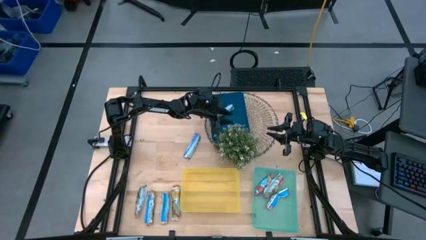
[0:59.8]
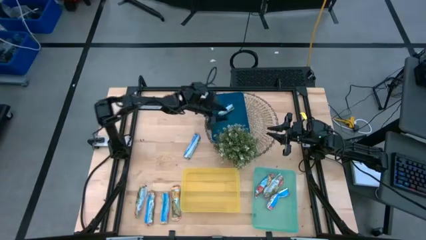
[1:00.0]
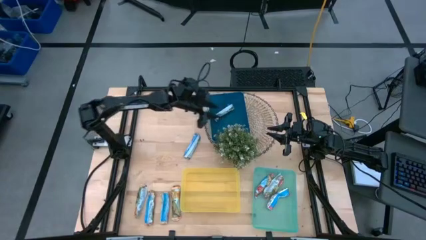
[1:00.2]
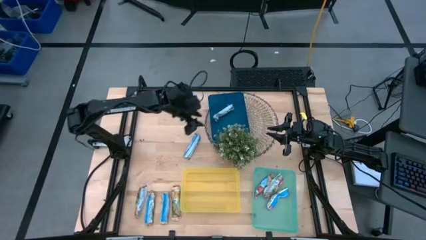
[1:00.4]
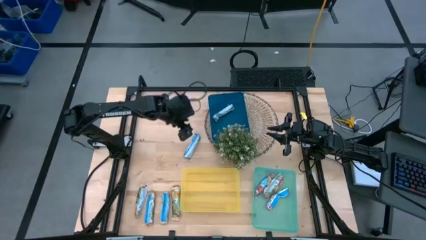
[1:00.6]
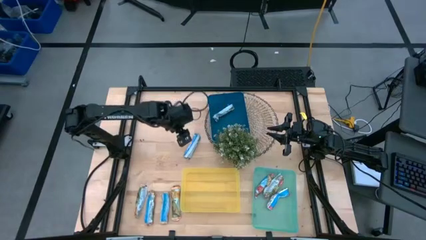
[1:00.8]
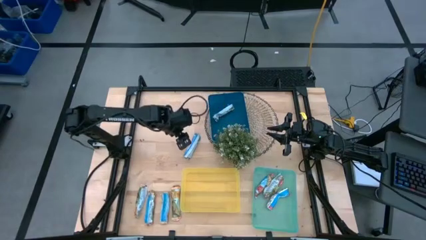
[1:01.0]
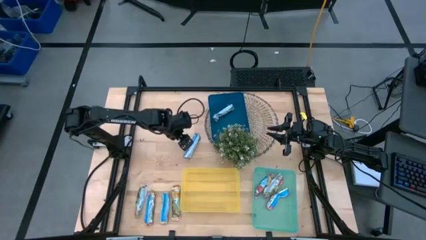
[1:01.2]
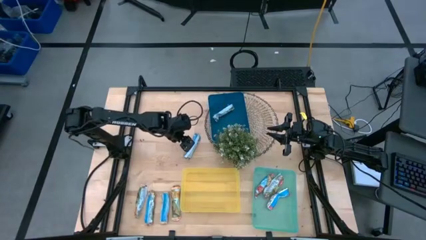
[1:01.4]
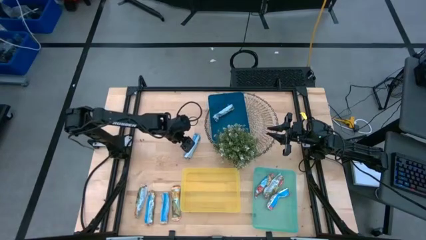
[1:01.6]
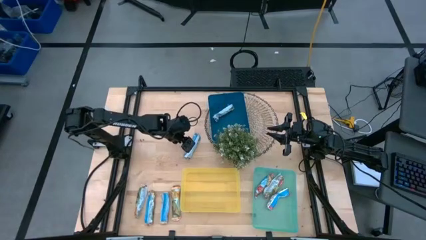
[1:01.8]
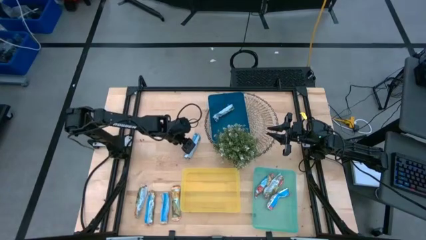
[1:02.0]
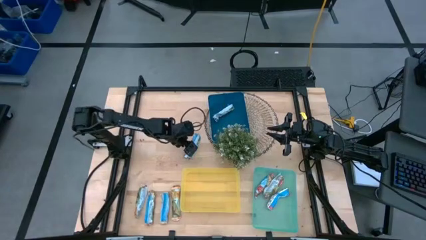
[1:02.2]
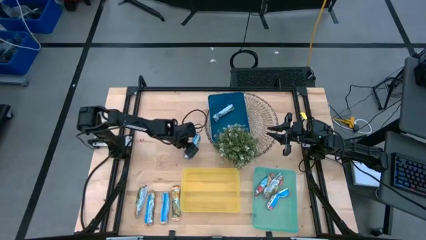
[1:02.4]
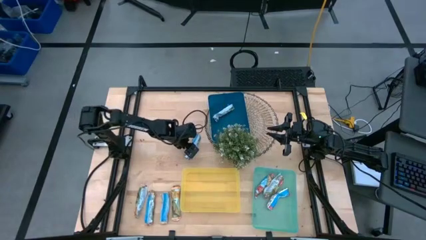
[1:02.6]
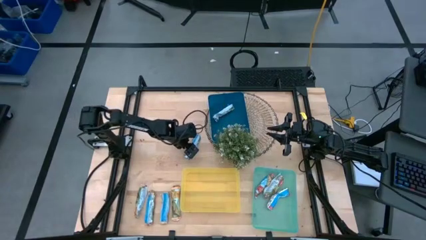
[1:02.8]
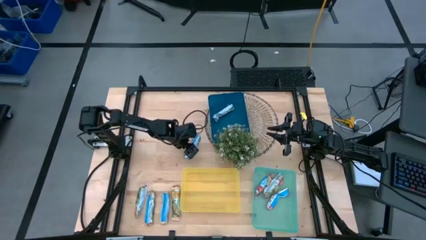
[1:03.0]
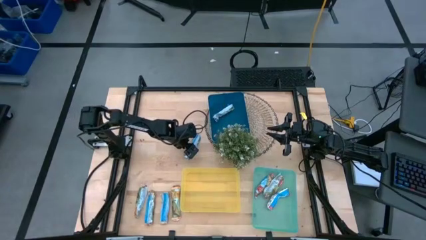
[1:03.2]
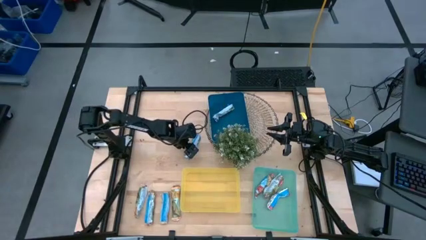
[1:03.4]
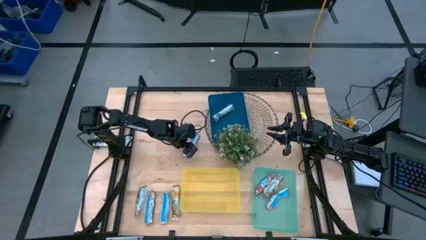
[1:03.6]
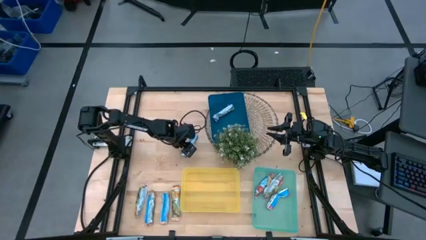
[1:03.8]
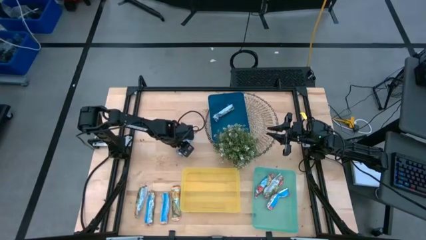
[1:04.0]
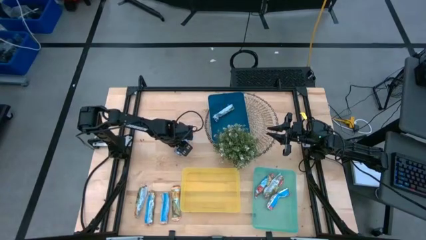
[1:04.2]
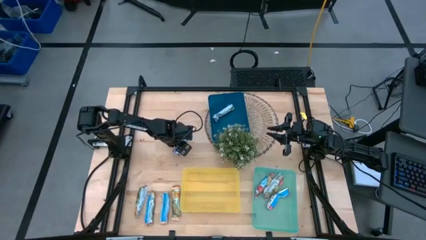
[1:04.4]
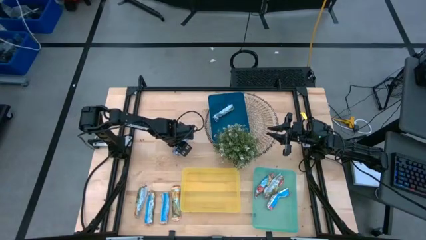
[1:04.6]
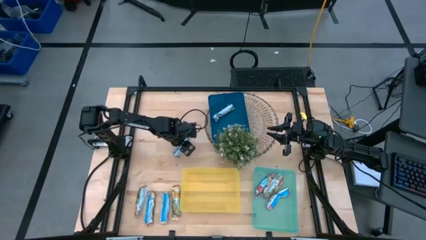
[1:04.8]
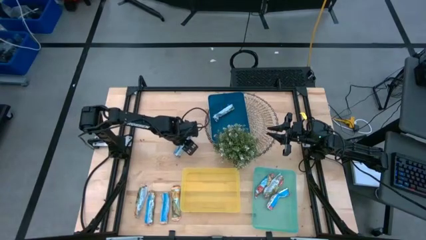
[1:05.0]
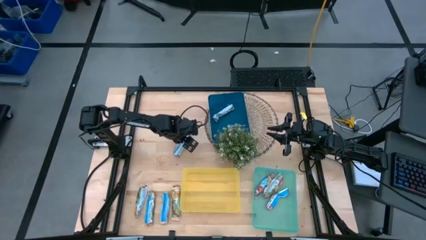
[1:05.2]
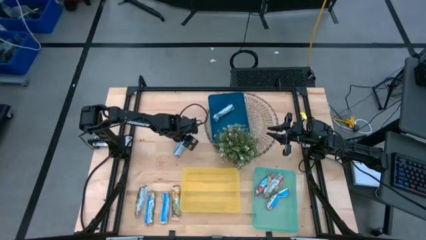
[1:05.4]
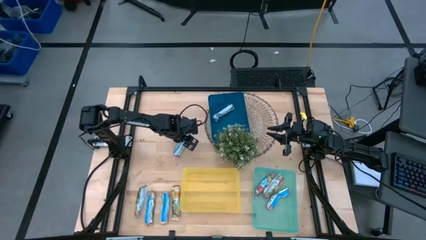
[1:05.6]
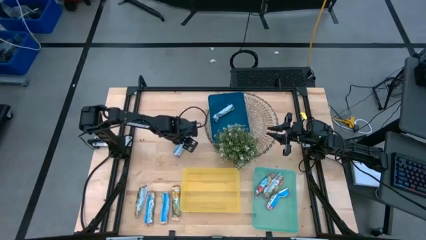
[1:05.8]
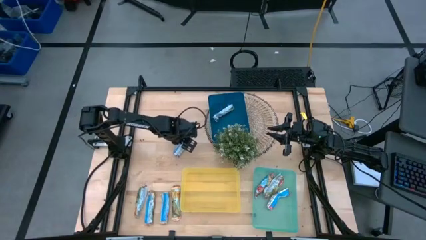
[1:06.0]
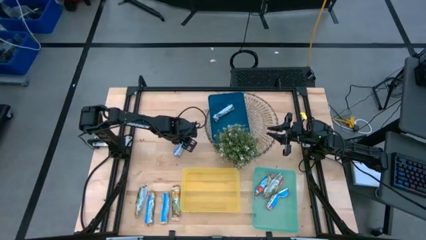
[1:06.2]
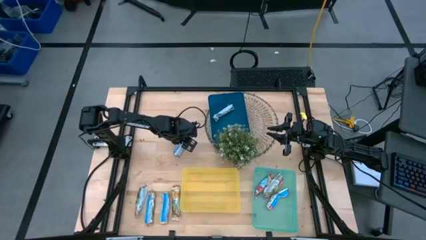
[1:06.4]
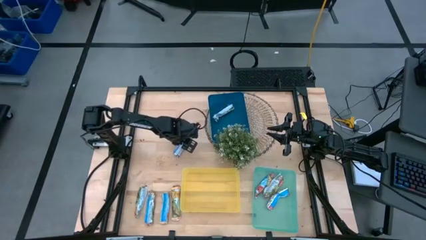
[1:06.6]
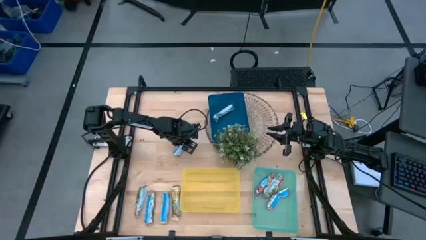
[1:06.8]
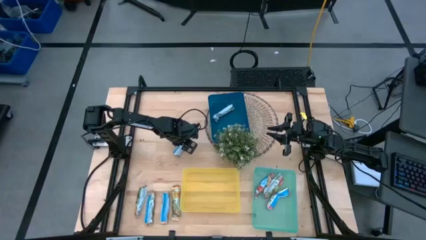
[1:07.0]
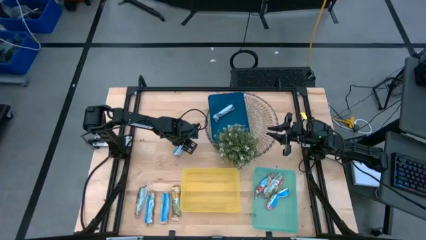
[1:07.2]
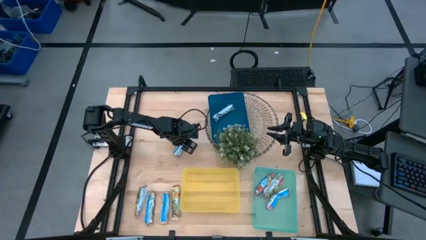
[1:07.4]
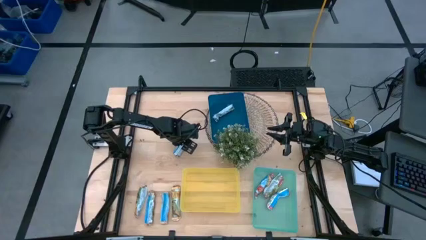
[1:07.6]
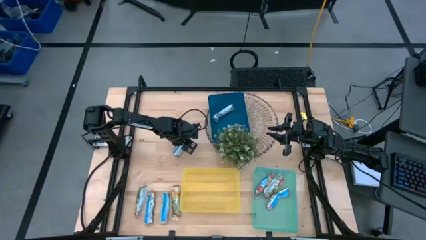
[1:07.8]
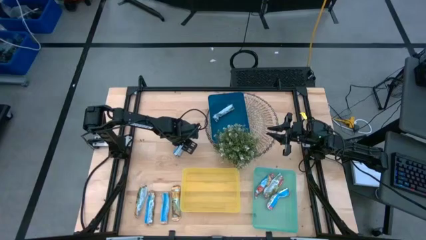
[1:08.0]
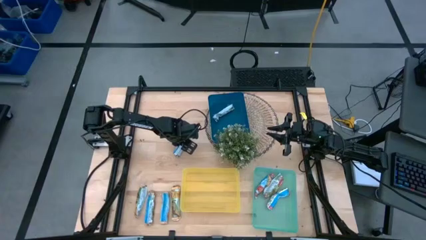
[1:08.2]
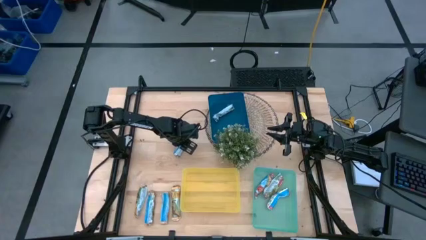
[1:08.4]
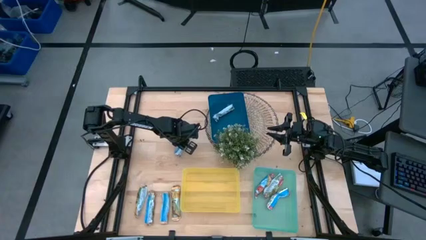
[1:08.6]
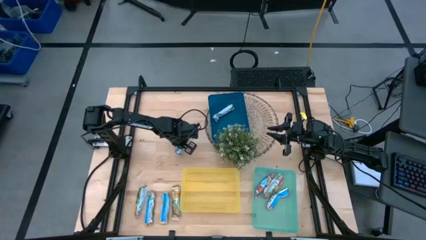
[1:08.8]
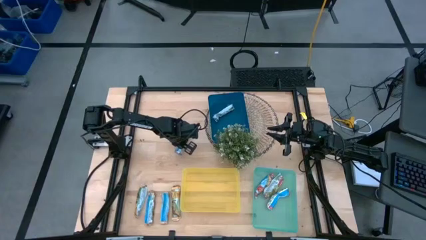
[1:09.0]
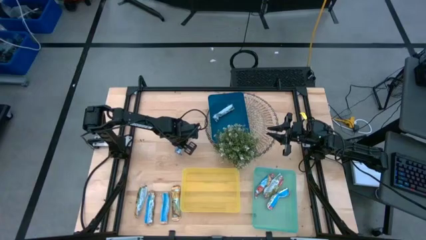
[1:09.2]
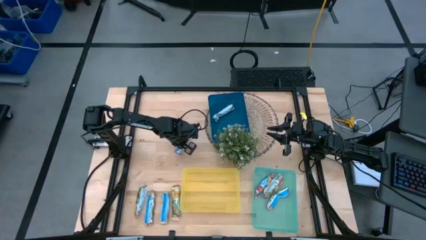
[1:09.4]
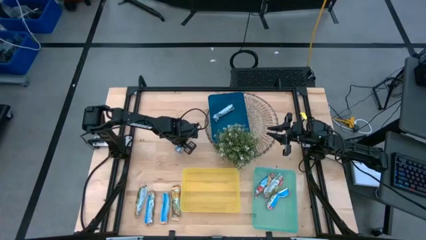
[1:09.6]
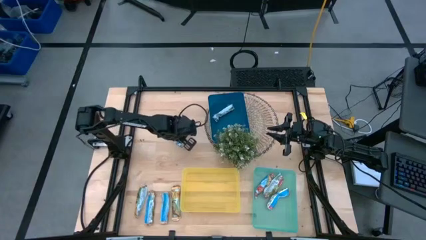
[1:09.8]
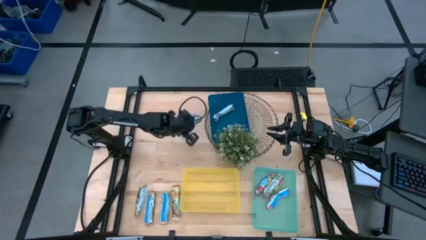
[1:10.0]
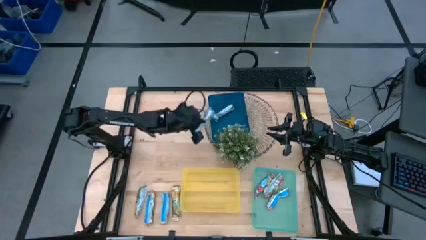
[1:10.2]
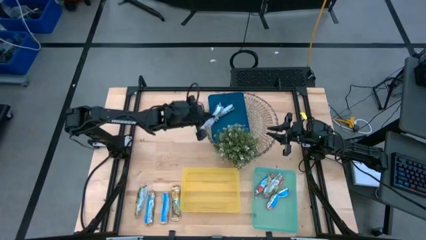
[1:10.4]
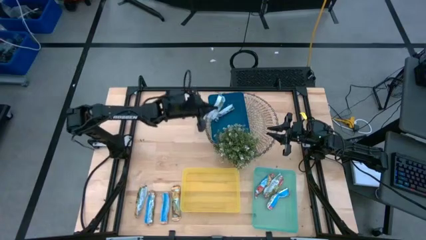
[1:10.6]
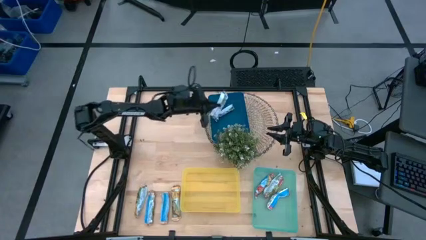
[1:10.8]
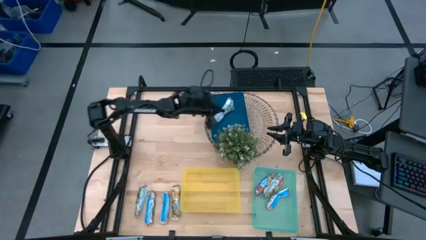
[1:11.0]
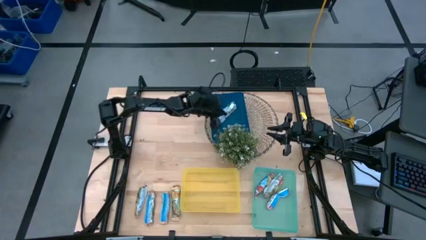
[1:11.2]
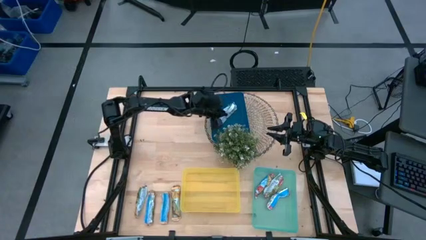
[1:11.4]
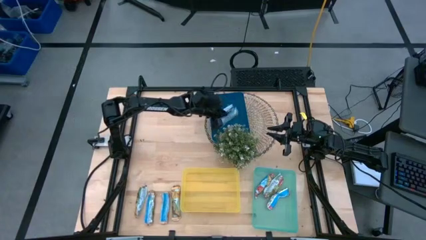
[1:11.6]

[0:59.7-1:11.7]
Task: Pick and place Granola Bars by type
Put the blue granola bar into the blue bin

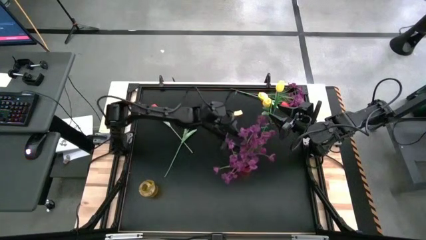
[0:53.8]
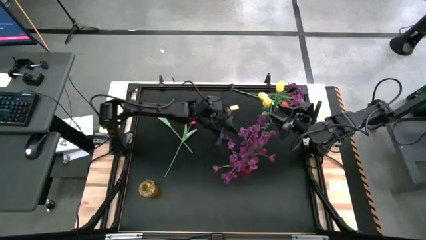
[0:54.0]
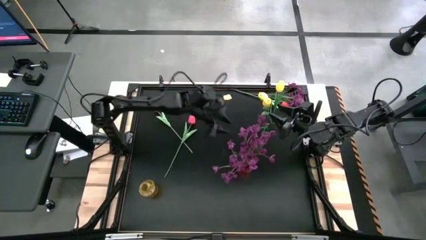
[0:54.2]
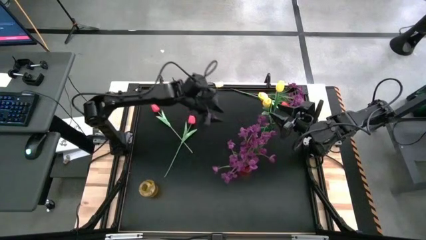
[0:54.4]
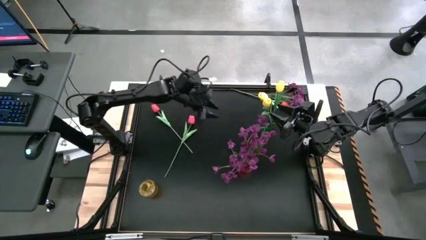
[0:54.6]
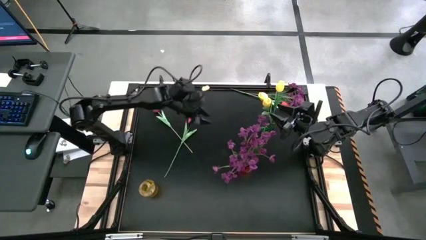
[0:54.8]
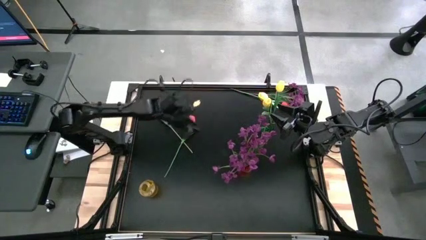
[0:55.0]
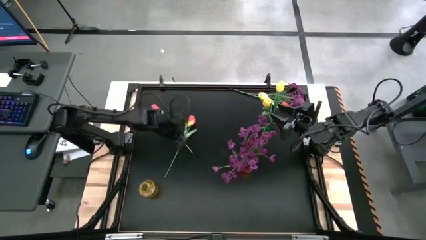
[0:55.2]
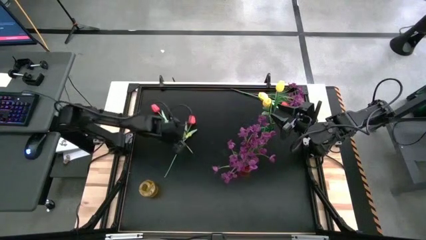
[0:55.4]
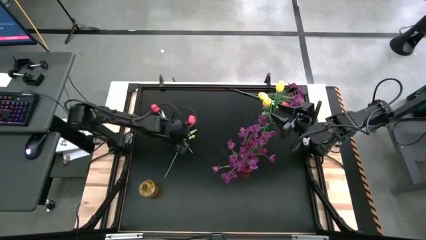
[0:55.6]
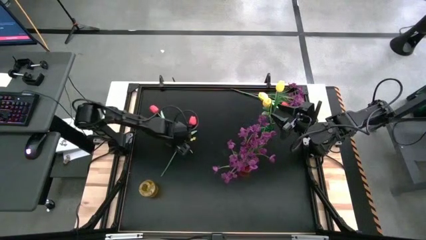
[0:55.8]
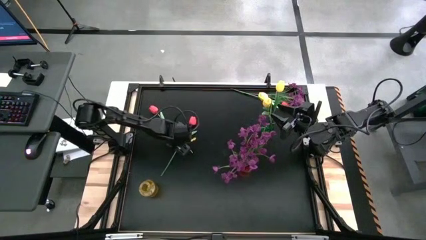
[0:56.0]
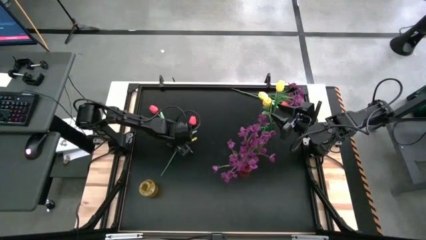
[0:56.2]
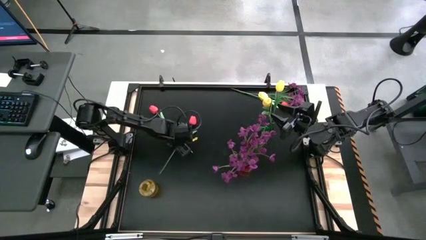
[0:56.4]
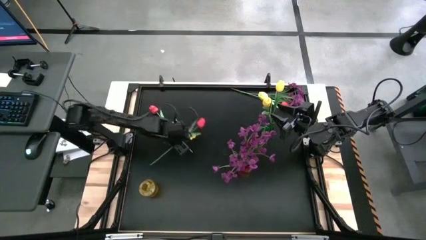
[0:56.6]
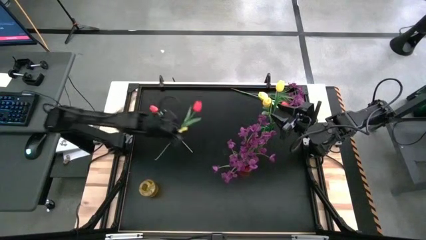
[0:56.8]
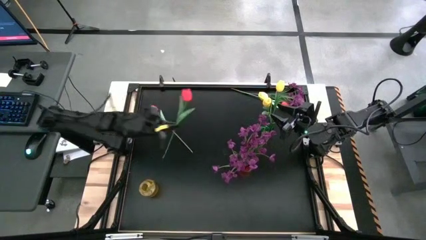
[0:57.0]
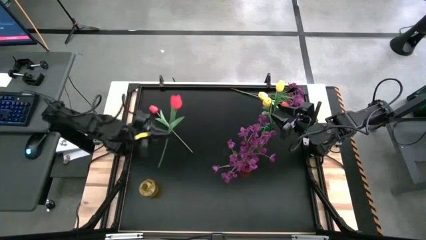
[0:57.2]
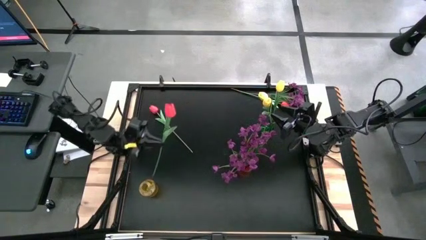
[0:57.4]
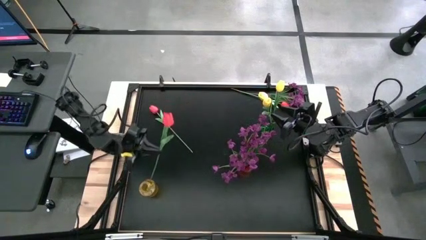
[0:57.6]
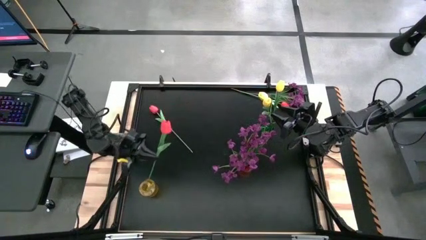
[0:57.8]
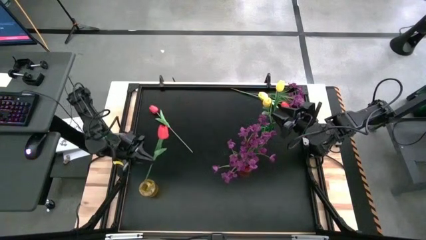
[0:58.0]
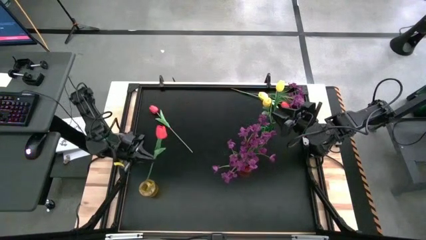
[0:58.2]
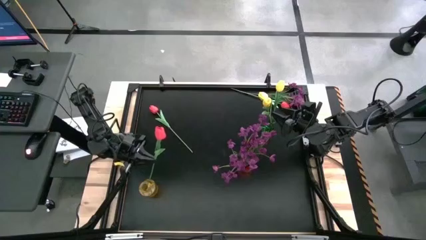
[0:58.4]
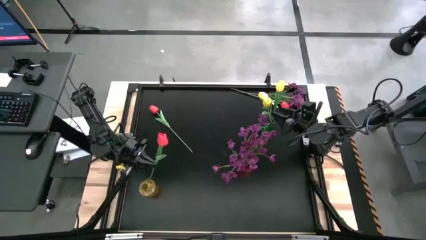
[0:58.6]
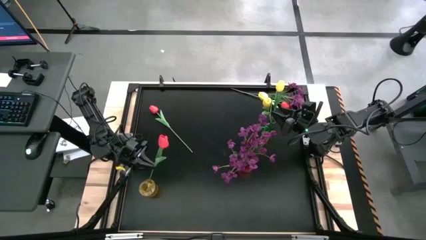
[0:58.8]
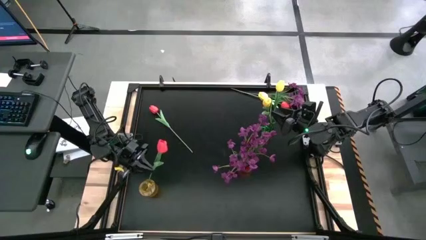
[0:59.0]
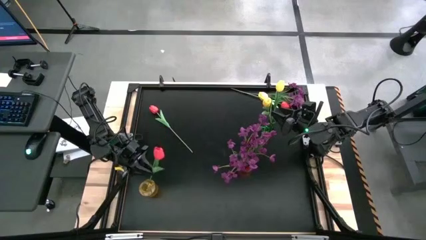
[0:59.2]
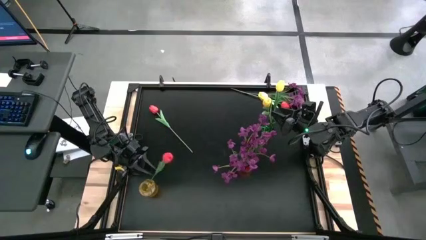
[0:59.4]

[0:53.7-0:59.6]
Task: Sort flowers into vase by color
Put the bottom right pink tulip into the yellow flower vase
